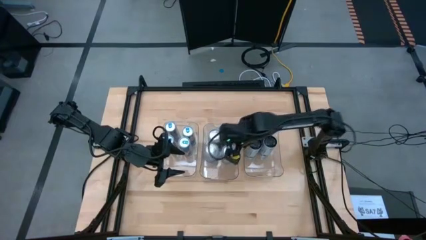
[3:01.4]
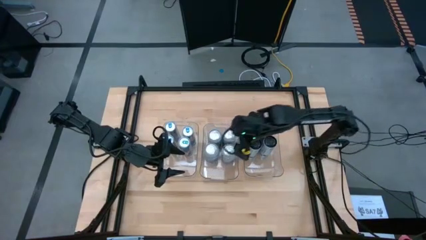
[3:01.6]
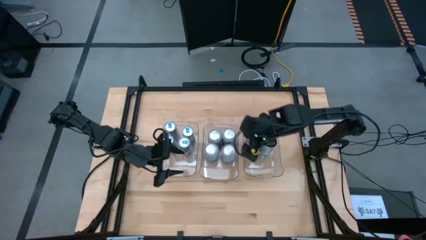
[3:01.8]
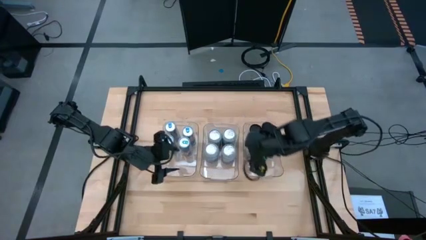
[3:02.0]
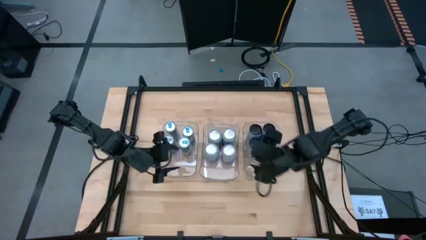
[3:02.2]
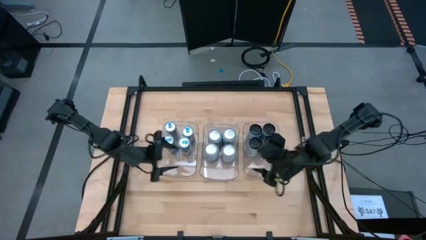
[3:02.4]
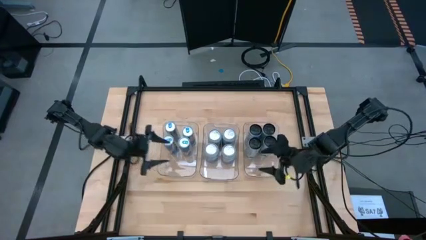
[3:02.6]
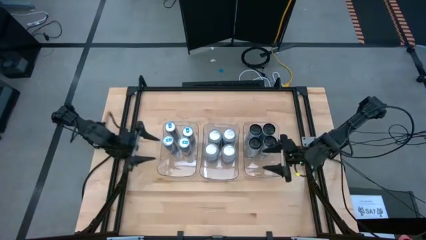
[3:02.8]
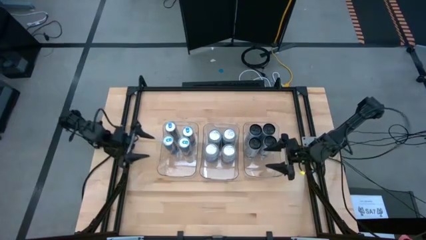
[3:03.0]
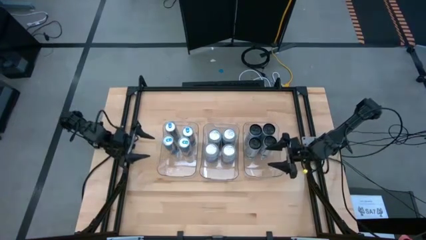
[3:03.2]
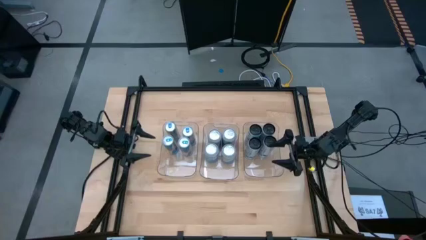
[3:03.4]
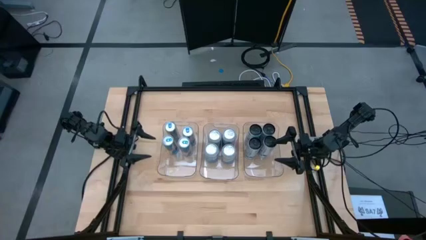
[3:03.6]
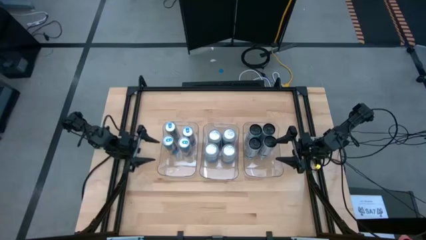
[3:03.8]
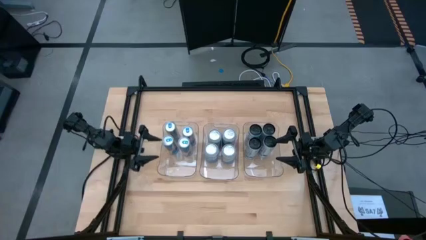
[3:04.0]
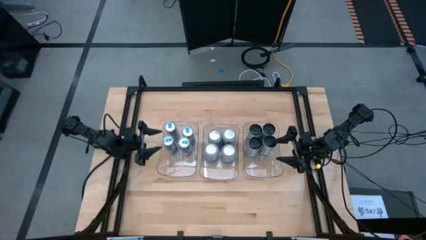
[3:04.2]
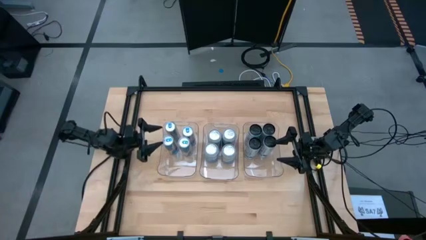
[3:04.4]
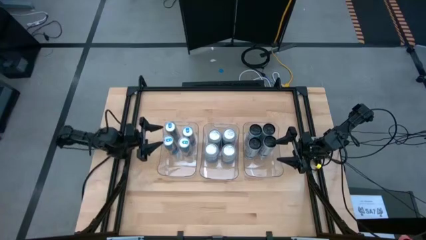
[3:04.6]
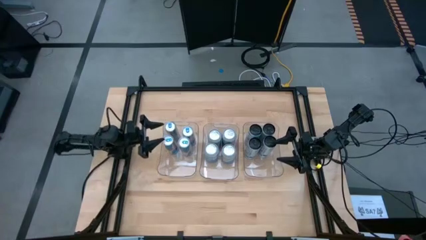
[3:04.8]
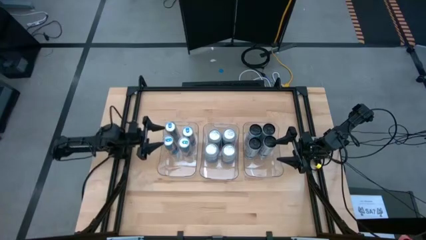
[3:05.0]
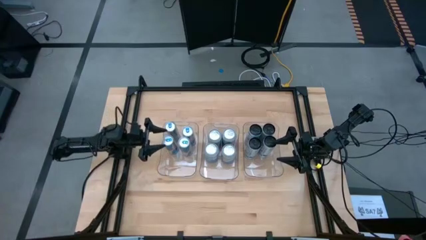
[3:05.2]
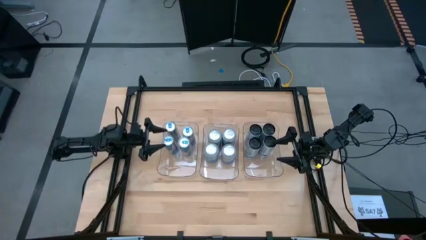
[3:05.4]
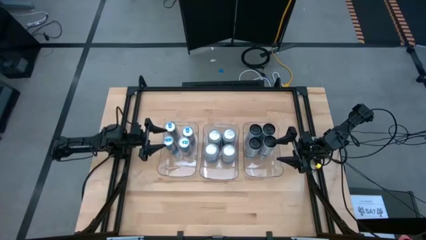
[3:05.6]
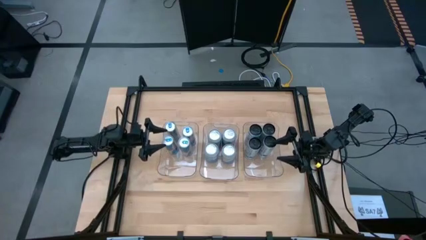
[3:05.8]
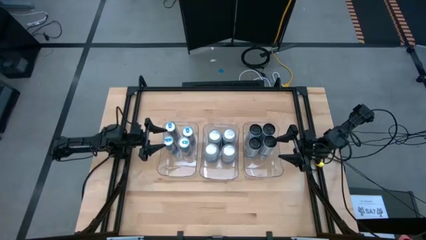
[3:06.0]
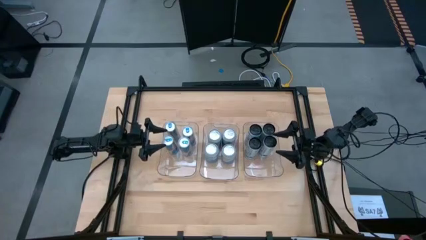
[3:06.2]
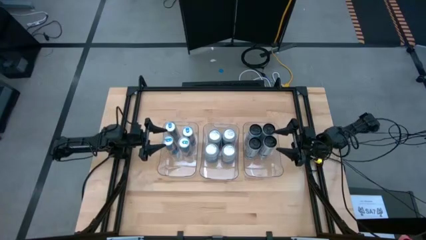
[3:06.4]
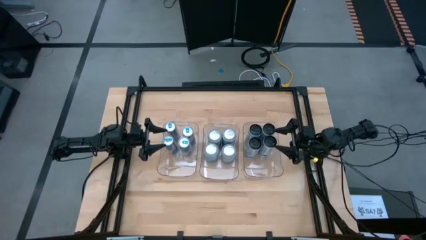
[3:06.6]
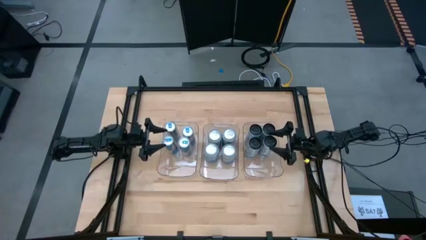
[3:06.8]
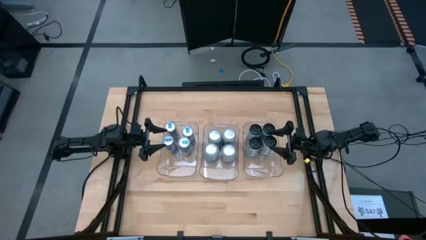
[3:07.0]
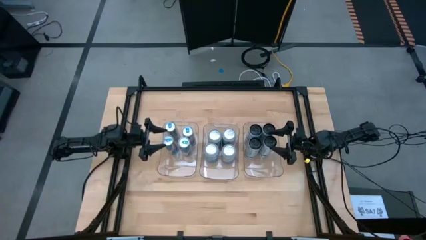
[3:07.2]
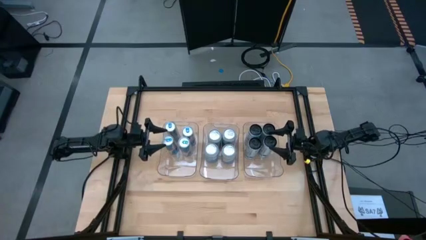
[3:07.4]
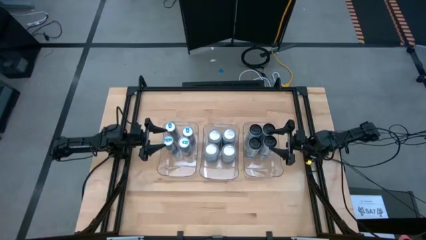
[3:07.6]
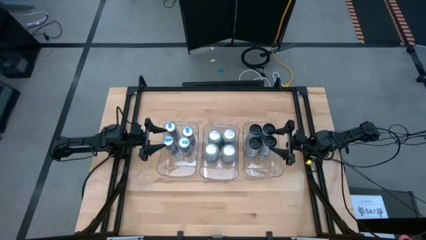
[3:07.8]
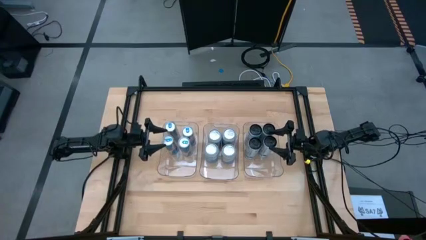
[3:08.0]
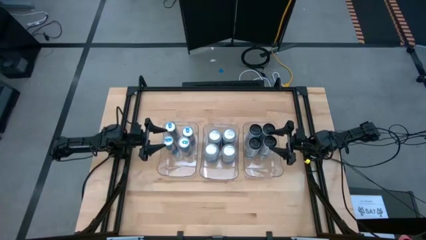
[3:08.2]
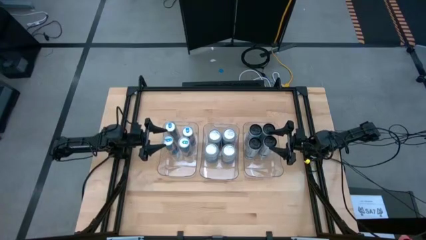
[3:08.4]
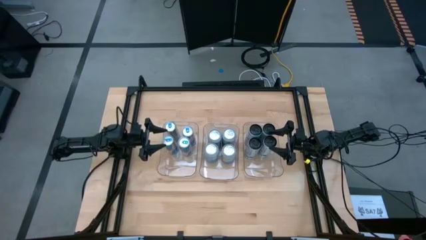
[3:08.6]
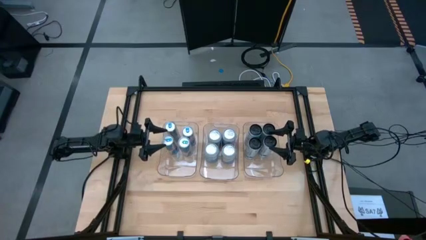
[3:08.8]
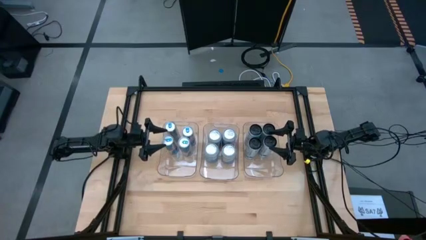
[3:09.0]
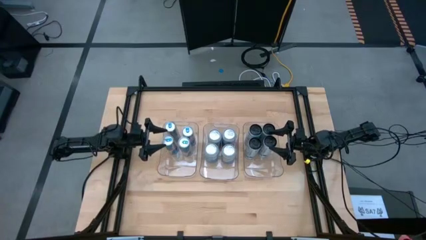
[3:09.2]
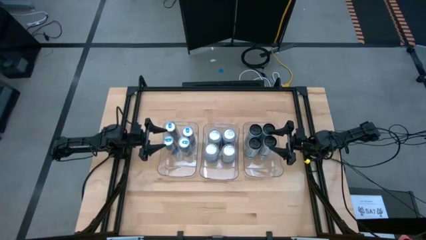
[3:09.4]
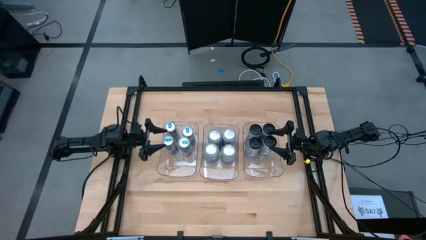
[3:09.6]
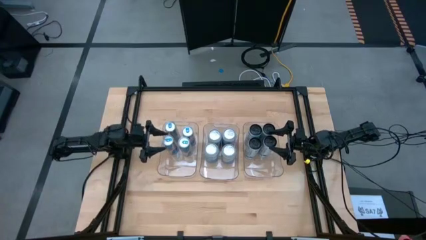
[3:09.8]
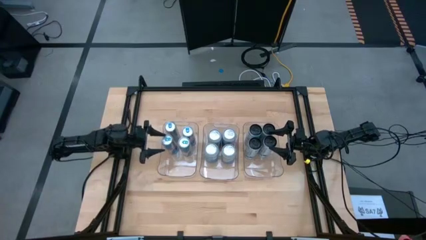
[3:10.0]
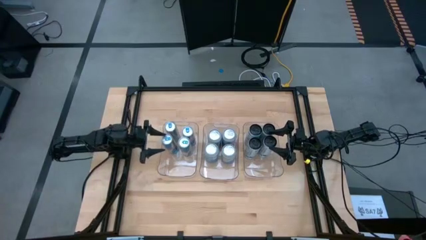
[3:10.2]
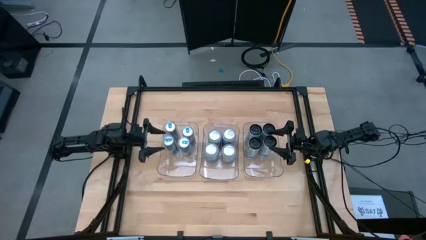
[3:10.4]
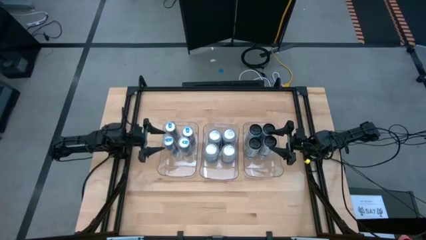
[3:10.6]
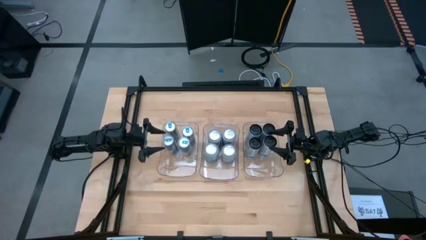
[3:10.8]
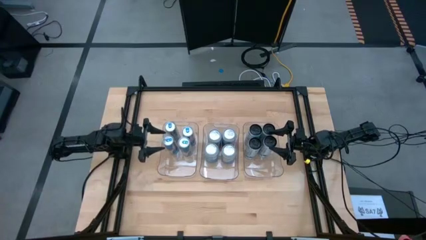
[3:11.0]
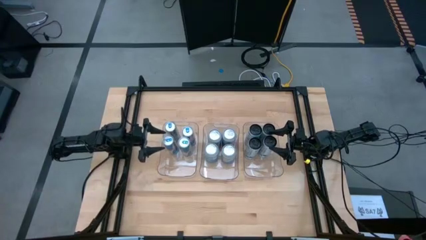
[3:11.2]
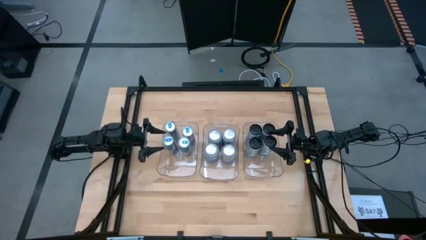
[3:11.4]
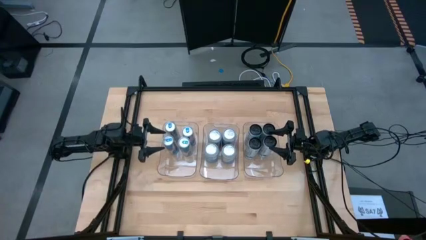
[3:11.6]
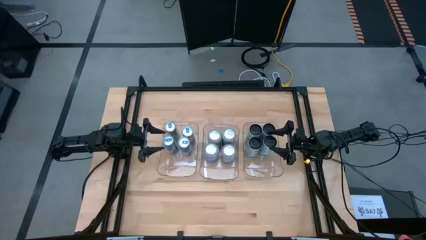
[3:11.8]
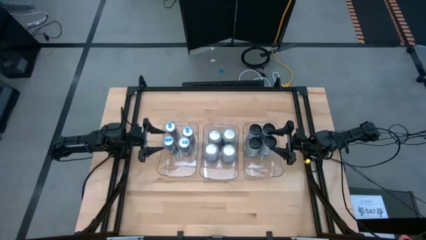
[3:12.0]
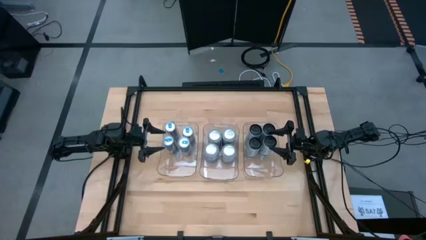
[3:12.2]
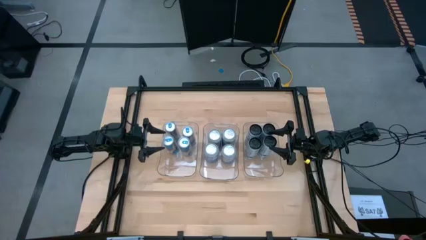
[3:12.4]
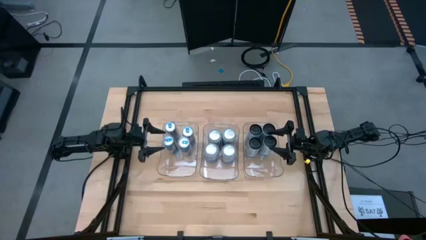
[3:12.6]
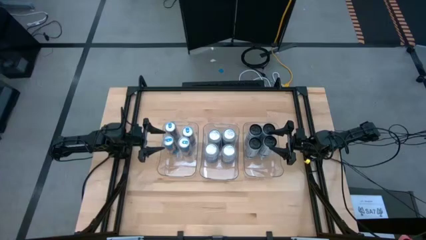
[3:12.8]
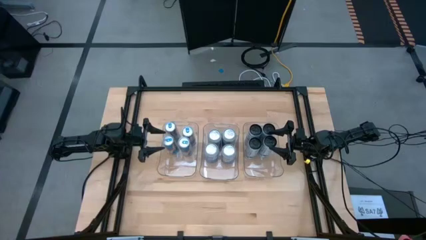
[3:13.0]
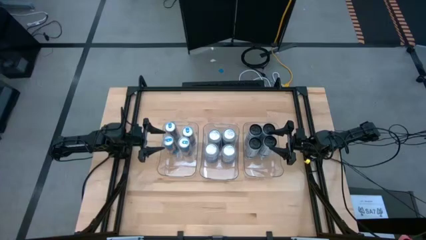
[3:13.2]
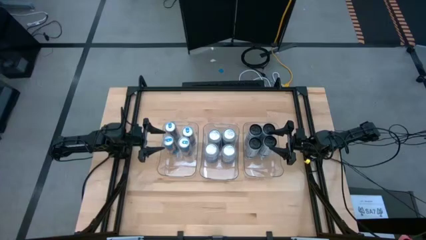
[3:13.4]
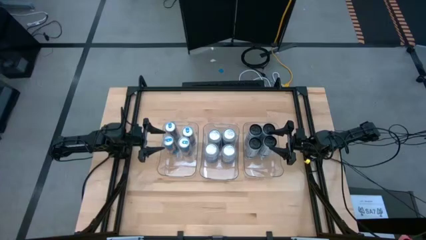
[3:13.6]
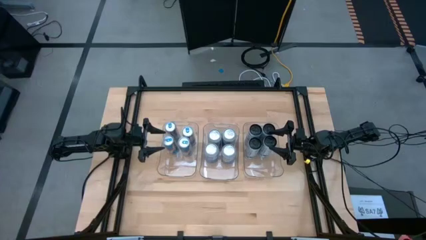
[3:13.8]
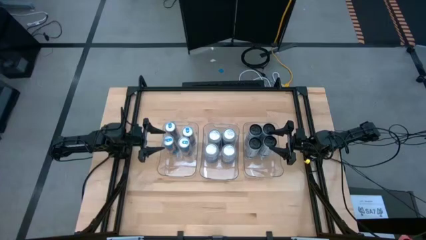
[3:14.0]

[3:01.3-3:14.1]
Task: Sort soda cans
Return to Home Position

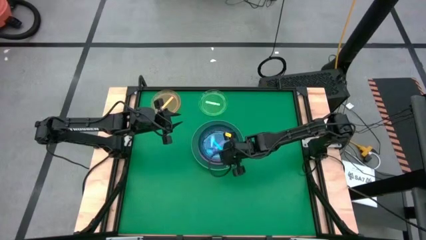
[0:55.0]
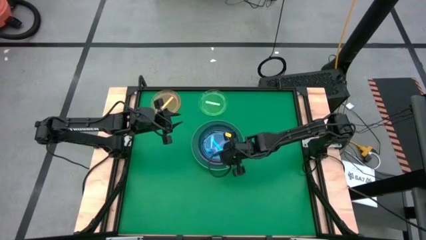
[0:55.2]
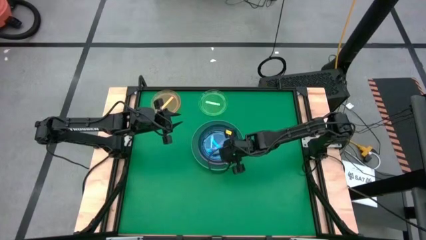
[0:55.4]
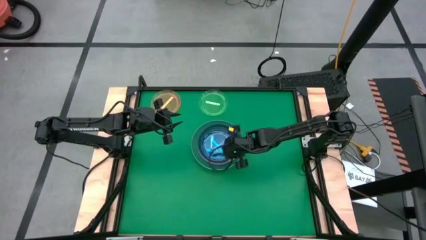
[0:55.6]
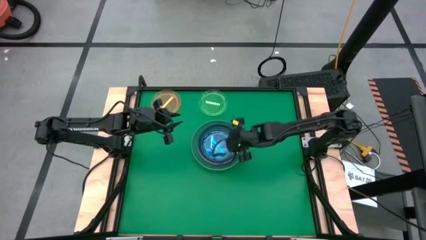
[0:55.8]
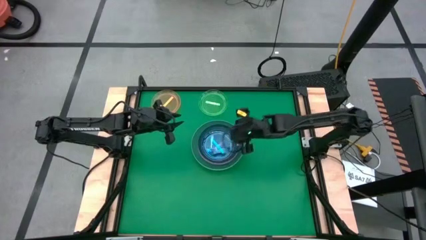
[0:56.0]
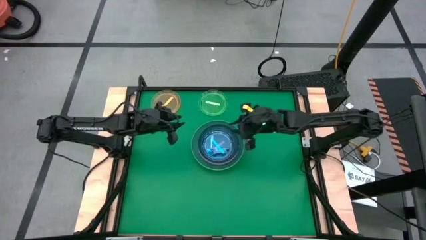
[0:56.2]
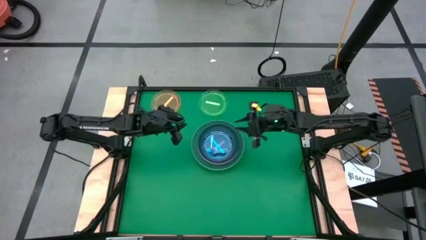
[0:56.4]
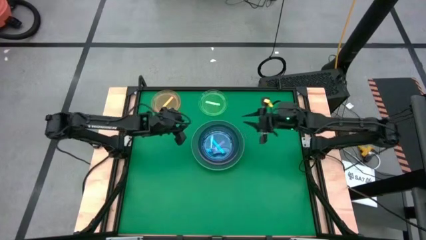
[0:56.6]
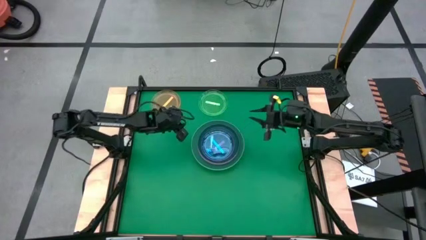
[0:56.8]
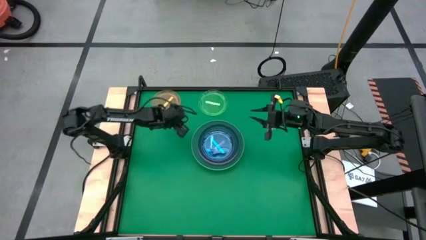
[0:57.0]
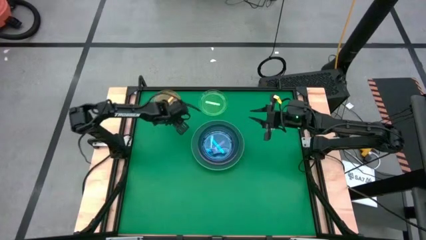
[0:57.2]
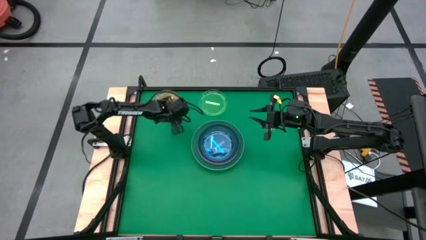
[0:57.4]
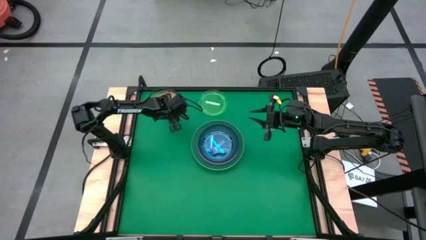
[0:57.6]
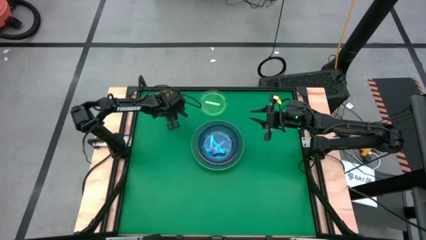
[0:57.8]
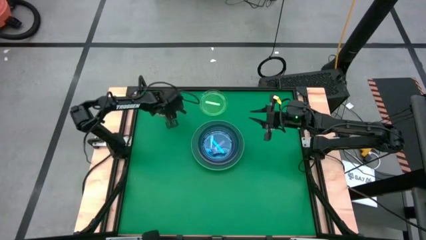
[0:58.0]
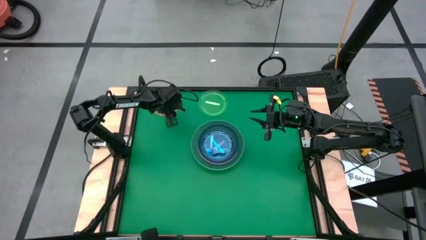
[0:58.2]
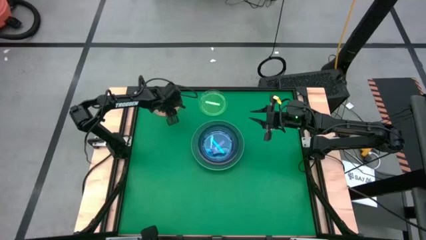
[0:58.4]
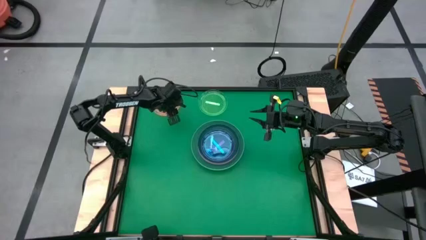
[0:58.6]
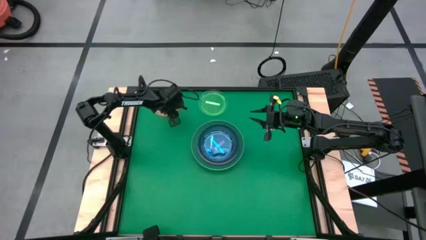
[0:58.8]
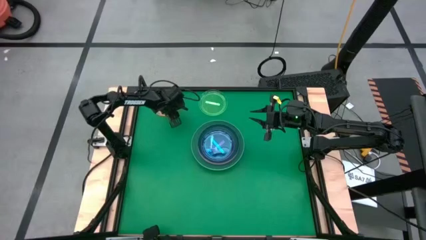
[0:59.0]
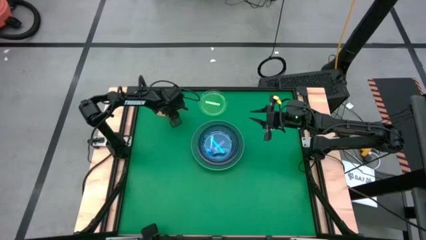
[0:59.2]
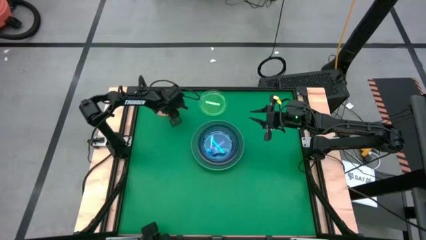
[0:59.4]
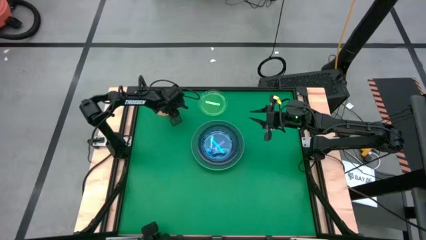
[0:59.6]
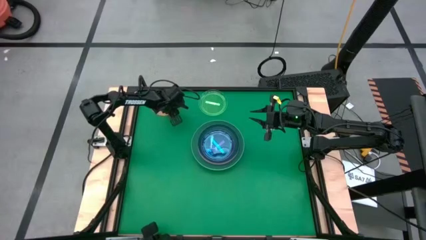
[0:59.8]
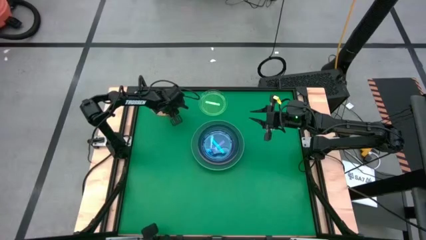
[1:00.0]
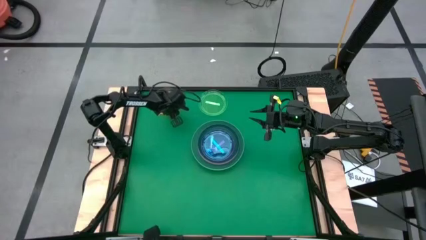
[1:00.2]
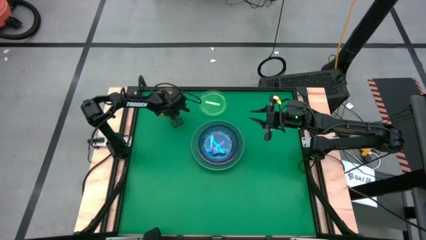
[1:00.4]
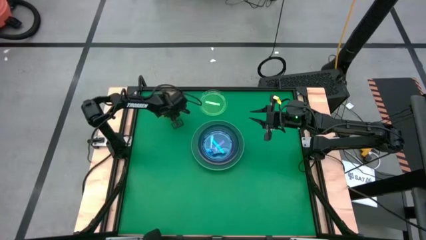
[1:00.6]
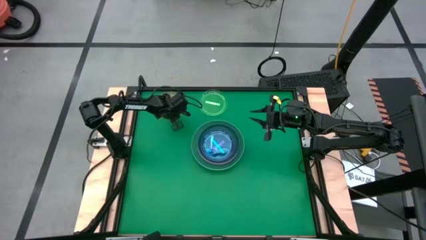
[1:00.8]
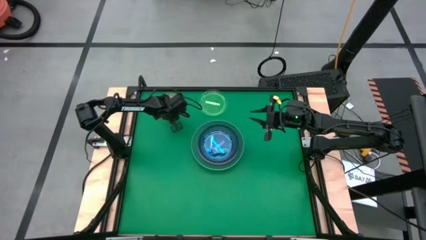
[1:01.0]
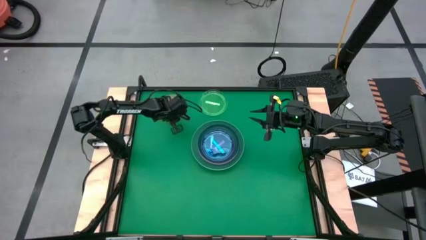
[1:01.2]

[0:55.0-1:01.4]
Task: Stack plastic plates
Stack the orange plate on top of the blue plate
